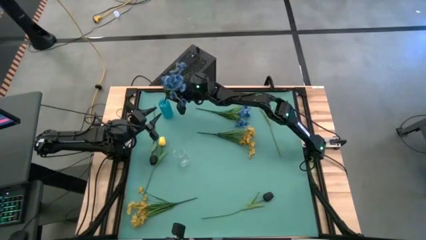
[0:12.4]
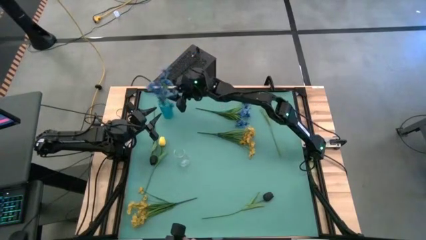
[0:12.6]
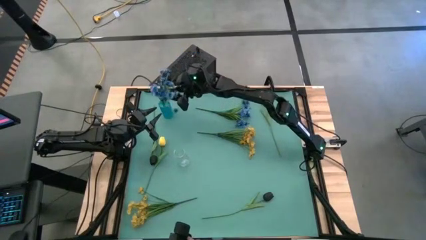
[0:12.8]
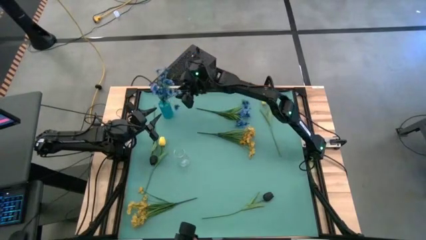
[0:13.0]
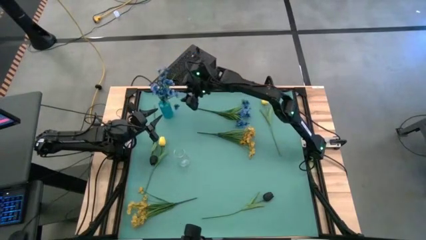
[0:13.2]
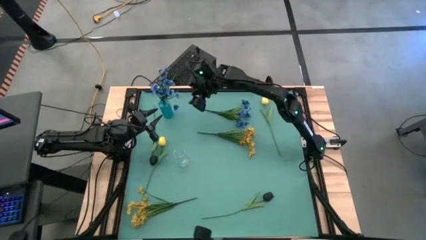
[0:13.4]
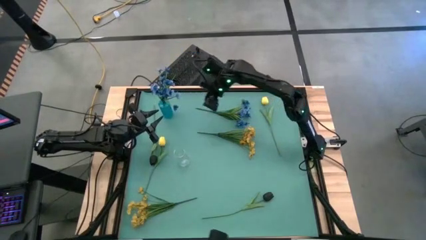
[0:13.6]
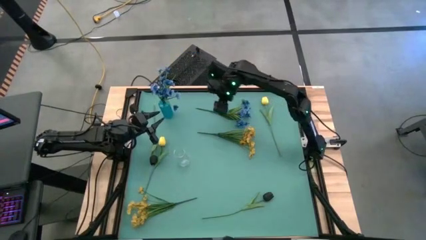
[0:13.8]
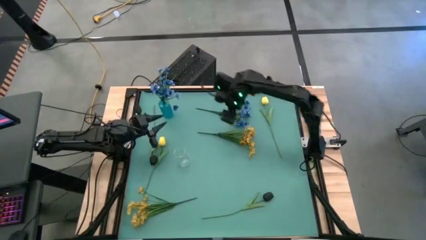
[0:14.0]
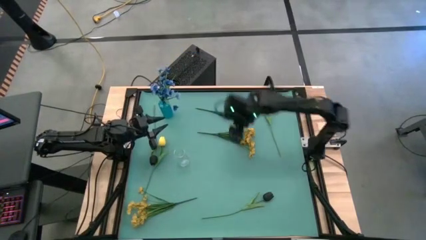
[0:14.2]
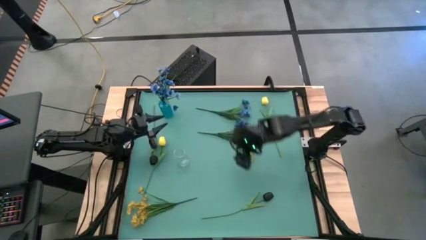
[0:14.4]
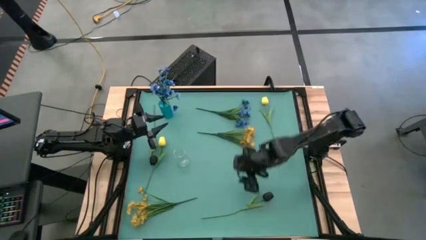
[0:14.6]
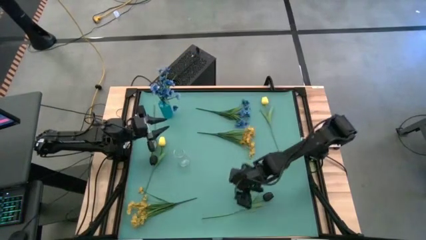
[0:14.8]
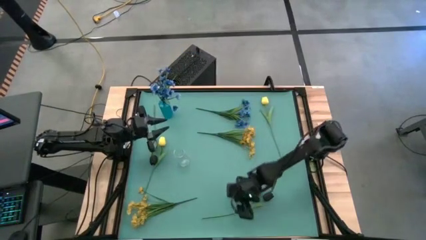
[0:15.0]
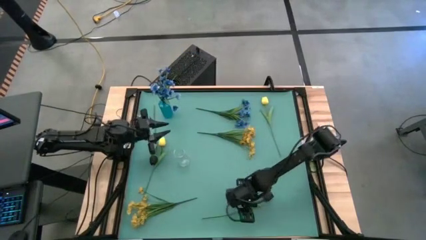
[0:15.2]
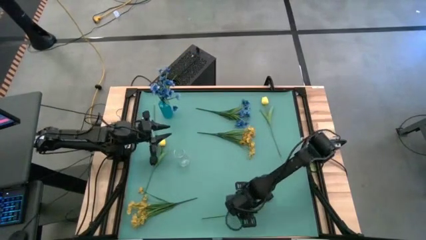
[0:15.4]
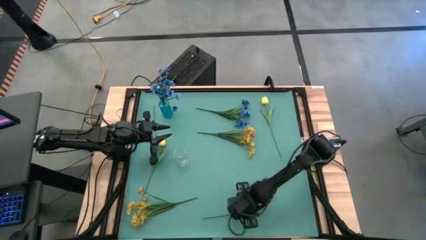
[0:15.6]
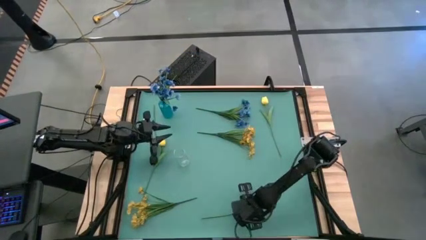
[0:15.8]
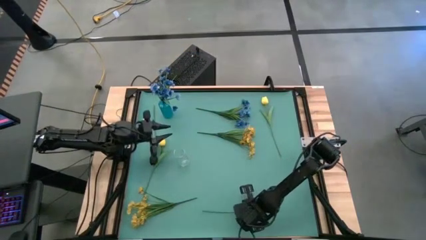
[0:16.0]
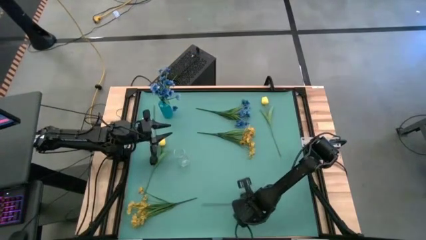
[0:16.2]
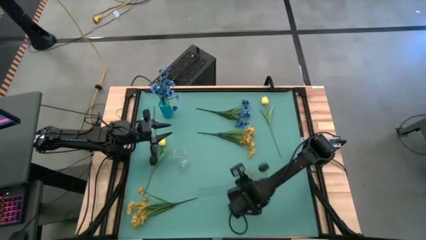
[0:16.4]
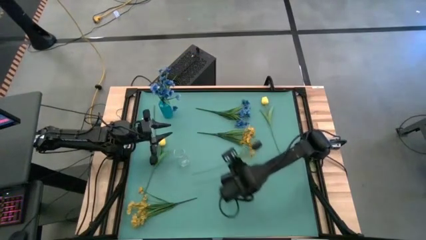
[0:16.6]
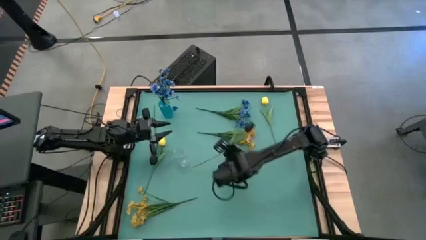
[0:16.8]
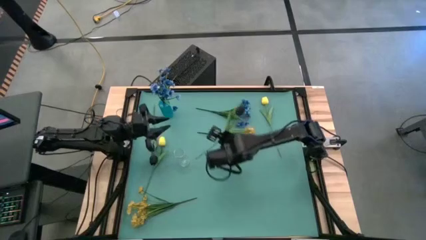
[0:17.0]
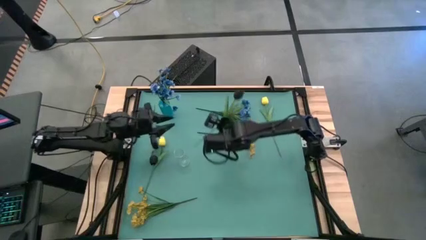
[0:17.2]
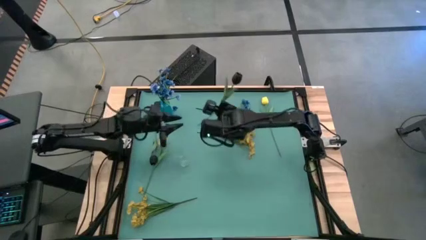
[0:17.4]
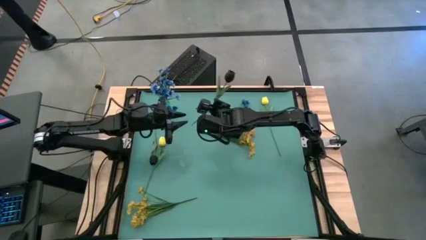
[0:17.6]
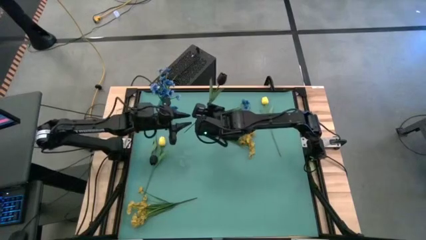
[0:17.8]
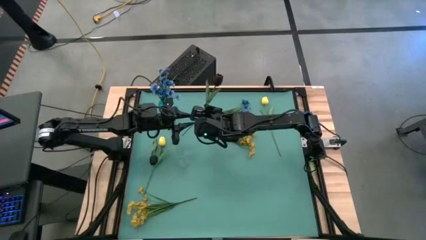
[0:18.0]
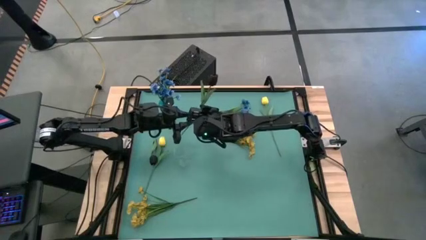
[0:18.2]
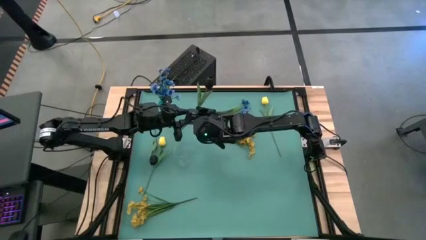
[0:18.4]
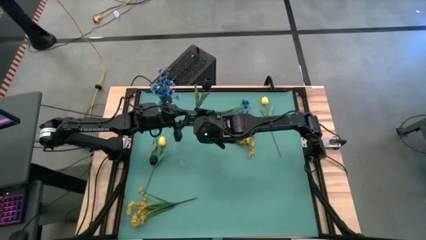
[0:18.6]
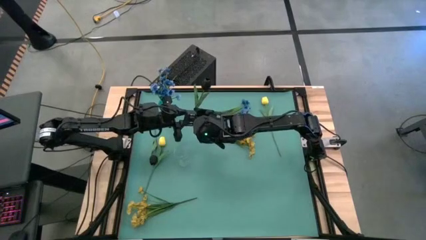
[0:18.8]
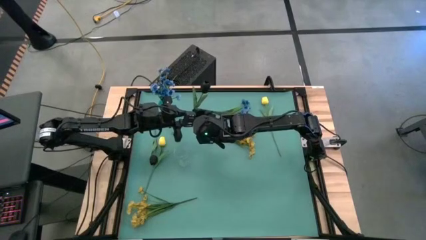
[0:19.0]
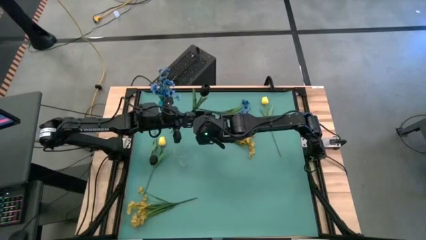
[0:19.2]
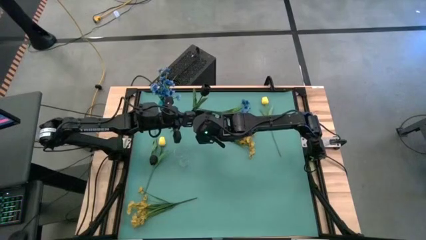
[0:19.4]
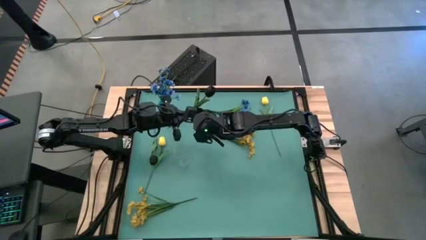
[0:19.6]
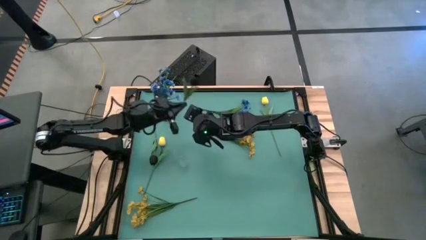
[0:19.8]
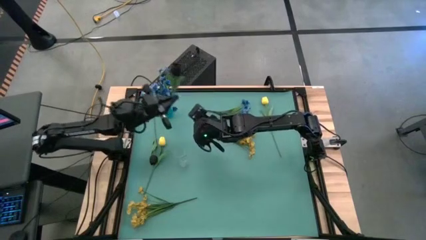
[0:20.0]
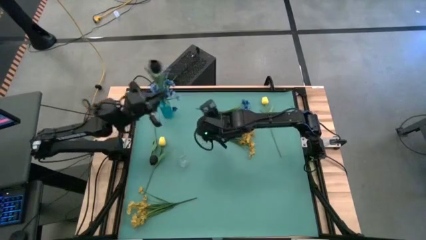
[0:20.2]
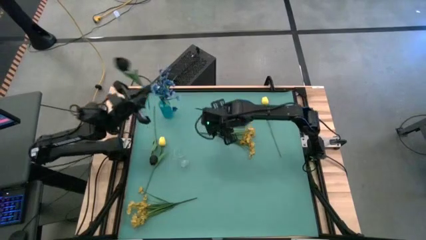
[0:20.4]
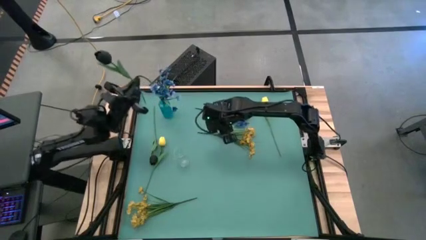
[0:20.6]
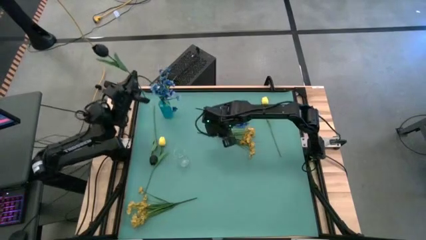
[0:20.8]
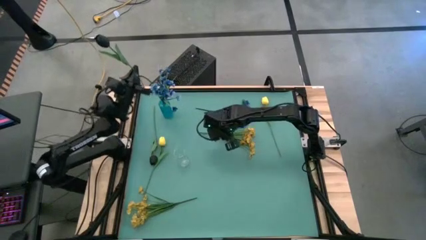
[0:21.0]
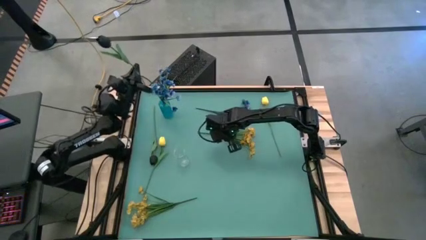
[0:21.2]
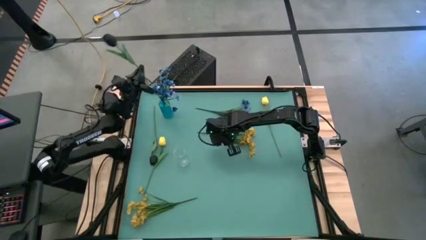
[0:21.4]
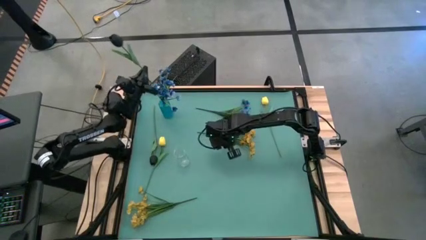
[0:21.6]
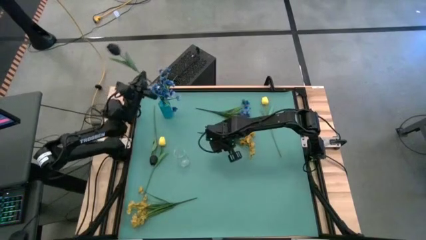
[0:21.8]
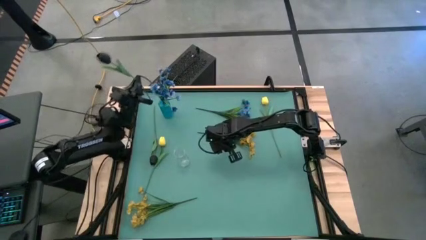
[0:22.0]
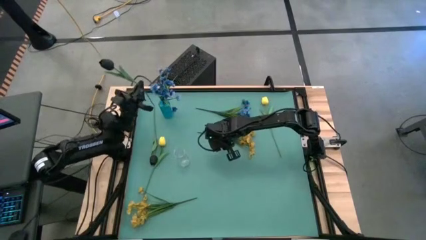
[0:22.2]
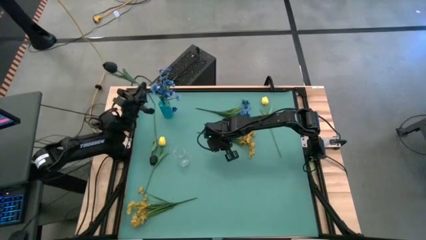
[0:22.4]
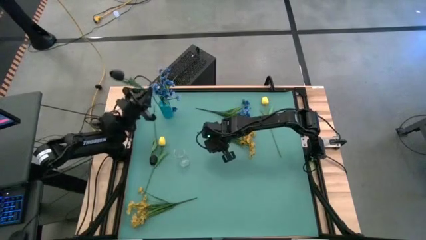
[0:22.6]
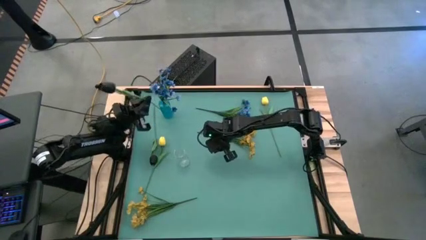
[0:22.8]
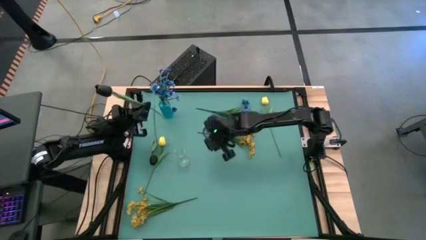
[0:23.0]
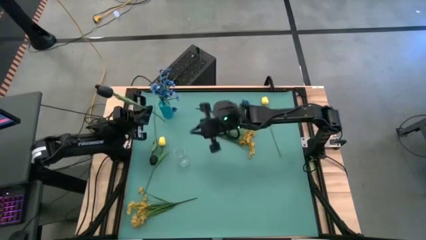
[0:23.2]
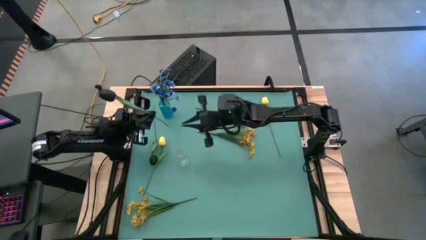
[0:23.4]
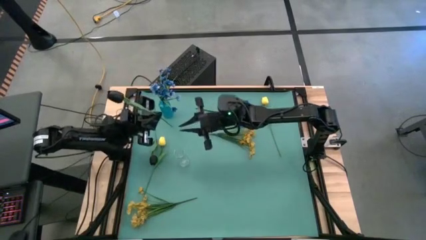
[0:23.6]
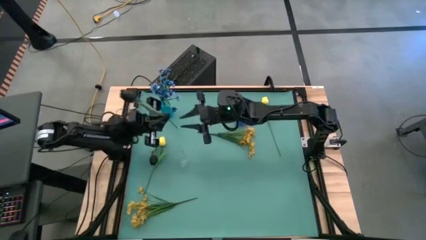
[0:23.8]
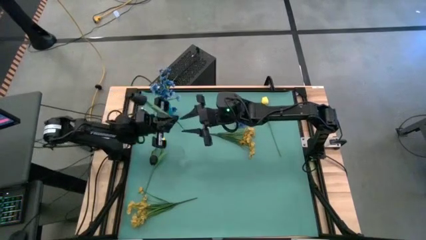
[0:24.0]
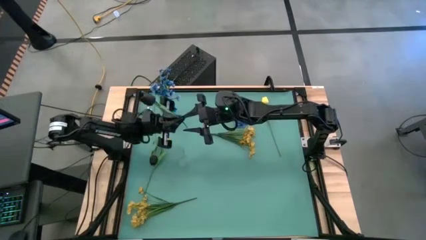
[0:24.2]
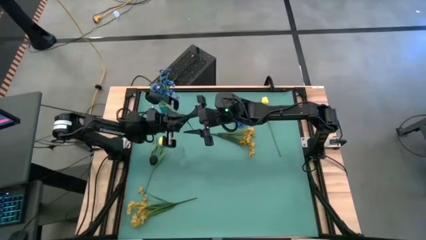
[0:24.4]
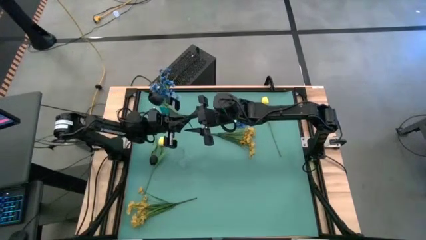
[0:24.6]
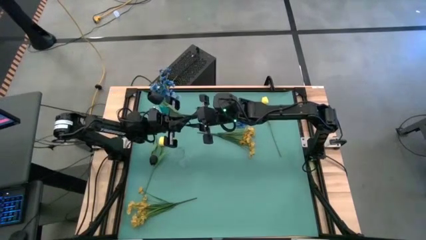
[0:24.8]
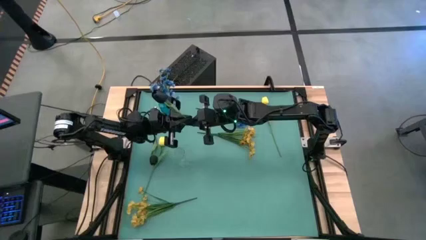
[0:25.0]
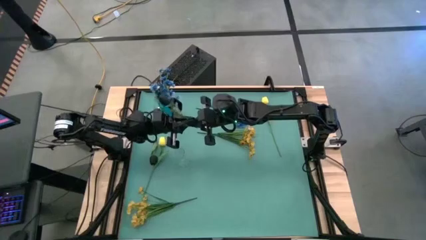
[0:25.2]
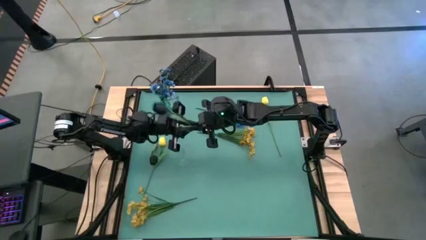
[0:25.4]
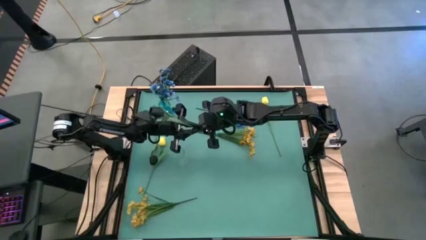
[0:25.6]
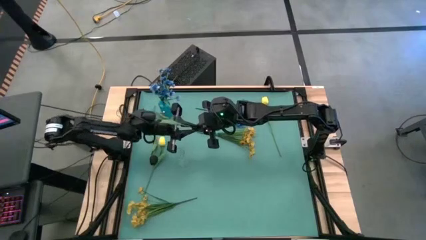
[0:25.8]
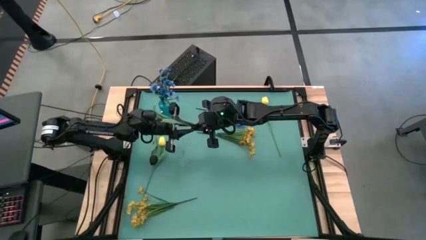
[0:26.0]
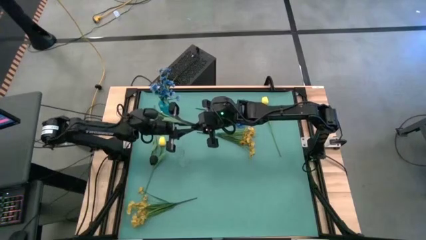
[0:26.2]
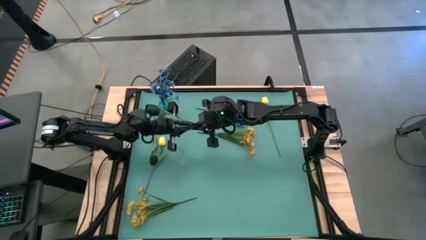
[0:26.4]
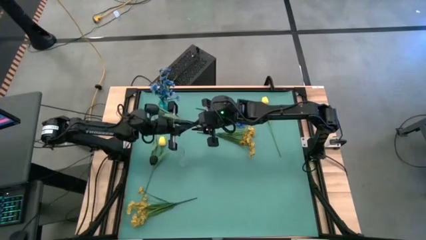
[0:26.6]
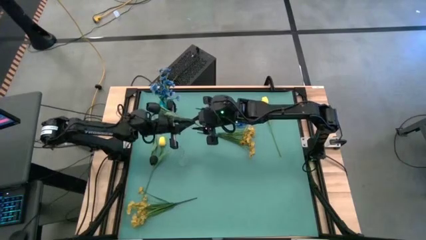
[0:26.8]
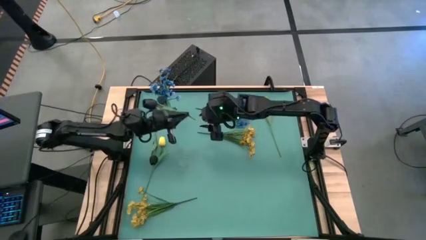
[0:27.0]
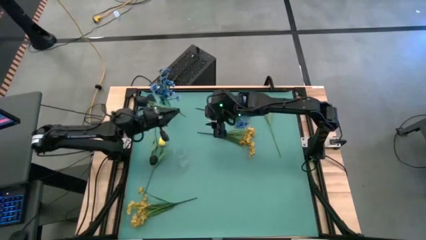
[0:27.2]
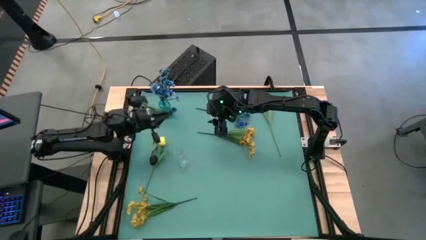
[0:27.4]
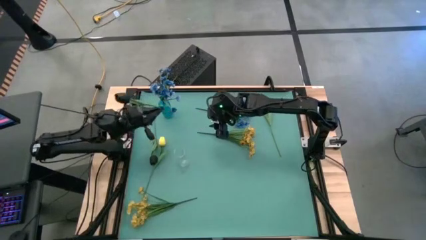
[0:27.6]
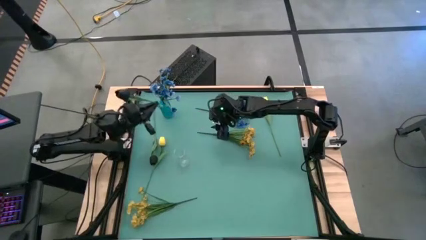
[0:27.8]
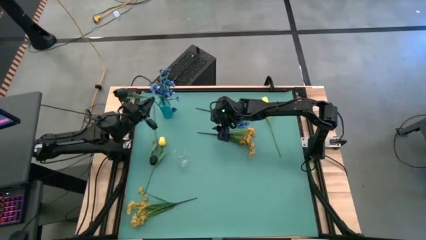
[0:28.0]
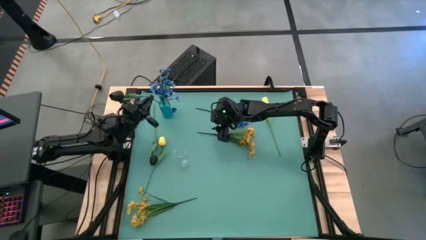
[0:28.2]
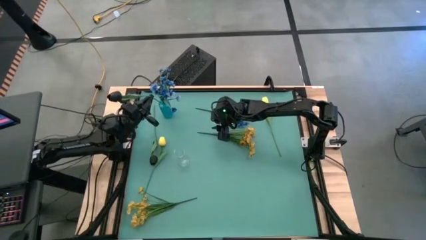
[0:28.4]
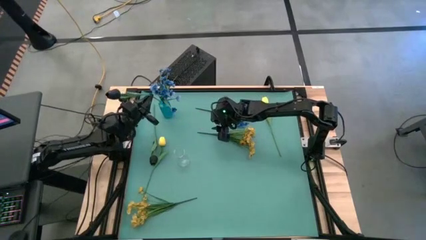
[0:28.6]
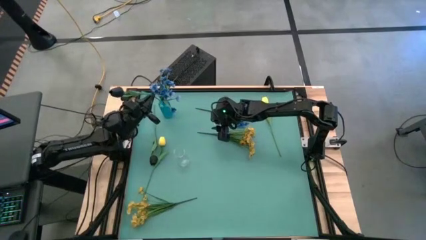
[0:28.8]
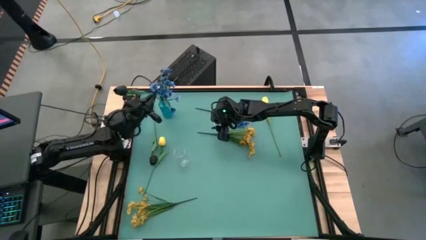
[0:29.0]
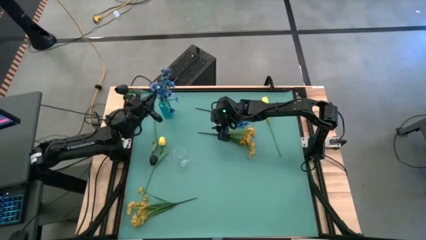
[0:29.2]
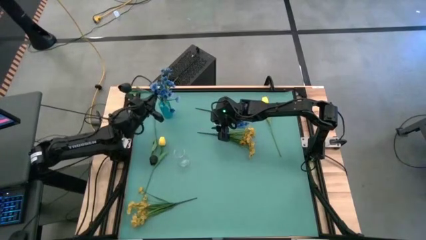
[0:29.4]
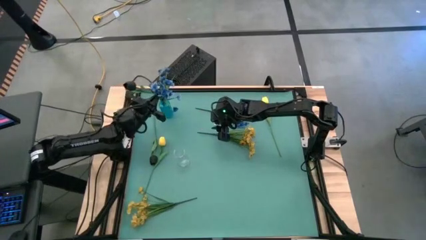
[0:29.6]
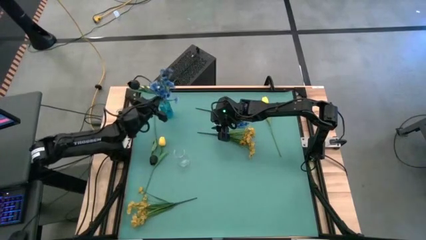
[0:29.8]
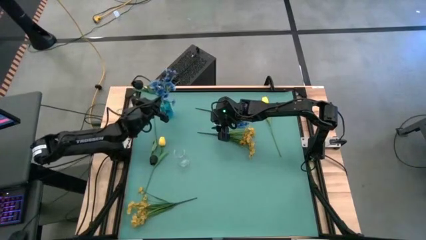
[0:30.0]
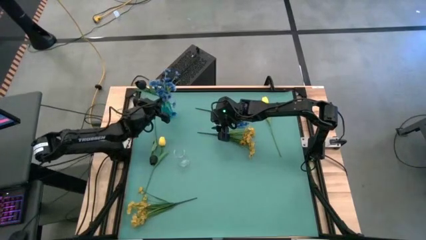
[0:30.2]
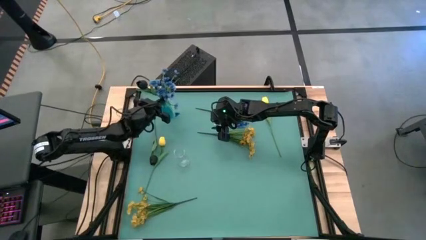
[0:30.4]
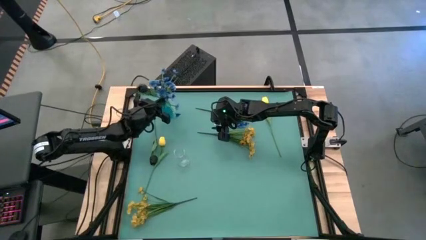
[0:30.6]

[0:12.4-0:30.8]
Task: Sort flowers into vase by color
Put the bottom black flower into the blue vase
